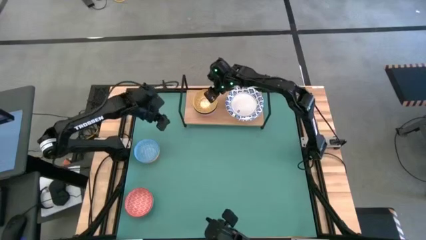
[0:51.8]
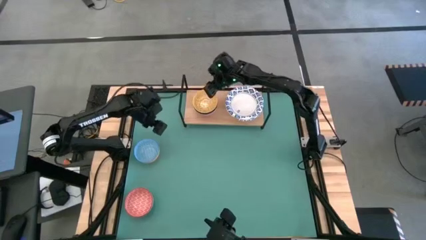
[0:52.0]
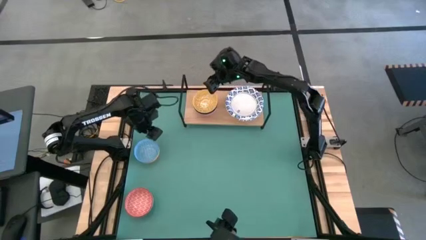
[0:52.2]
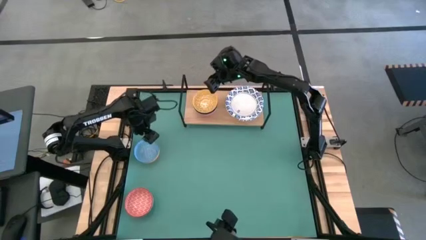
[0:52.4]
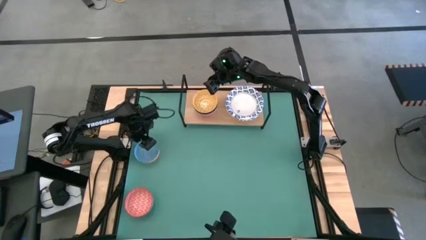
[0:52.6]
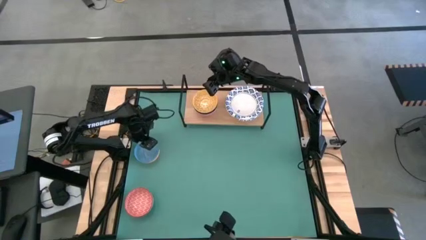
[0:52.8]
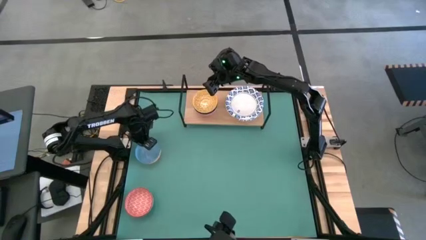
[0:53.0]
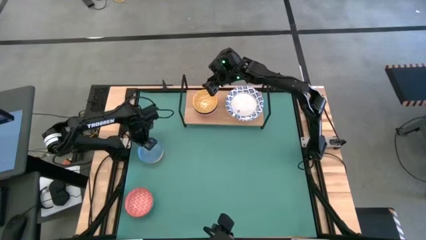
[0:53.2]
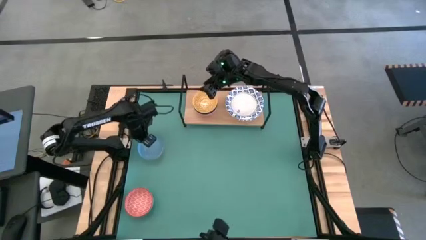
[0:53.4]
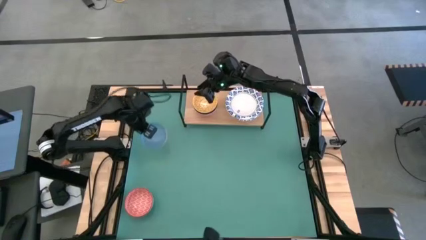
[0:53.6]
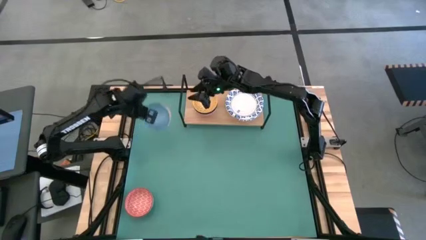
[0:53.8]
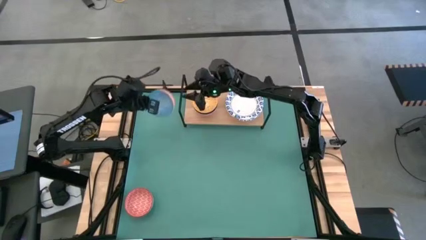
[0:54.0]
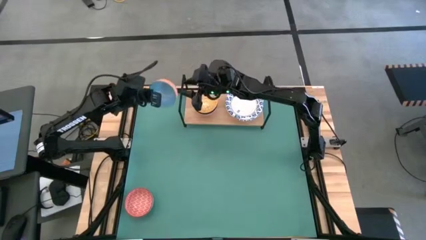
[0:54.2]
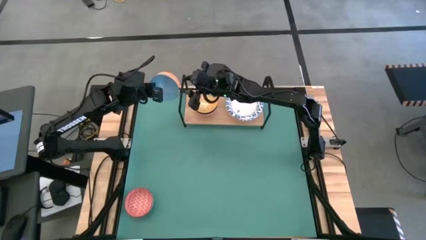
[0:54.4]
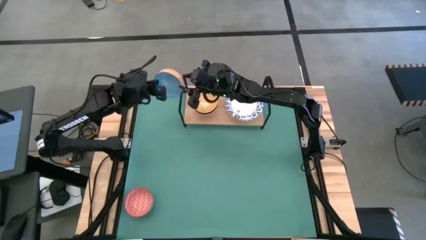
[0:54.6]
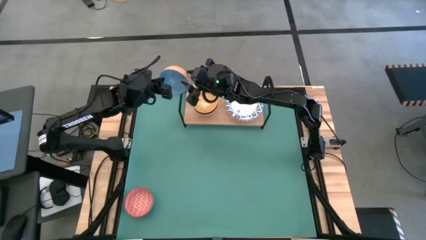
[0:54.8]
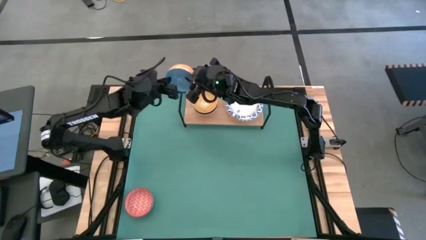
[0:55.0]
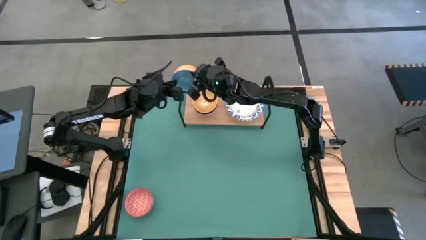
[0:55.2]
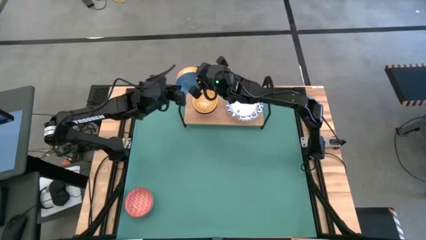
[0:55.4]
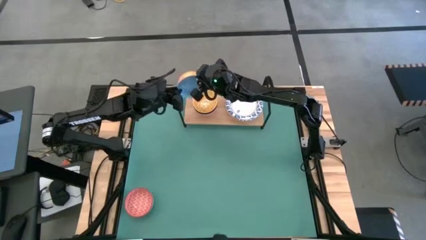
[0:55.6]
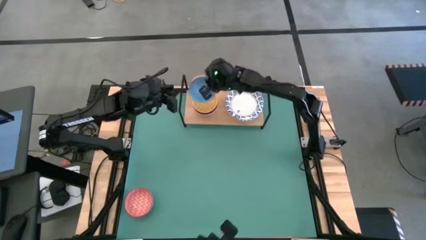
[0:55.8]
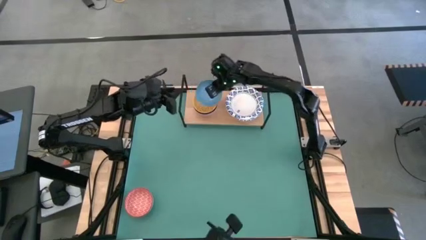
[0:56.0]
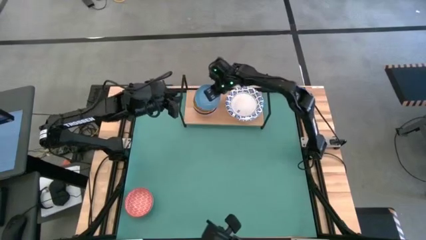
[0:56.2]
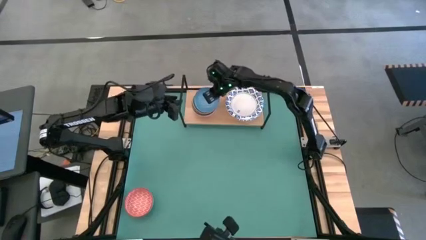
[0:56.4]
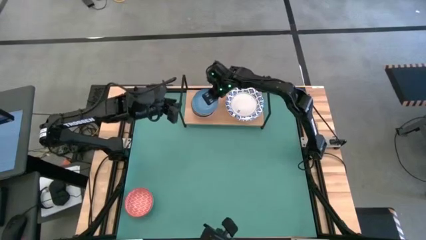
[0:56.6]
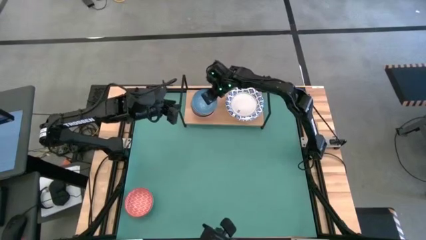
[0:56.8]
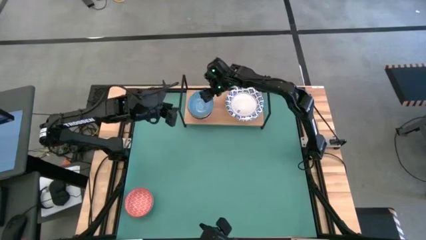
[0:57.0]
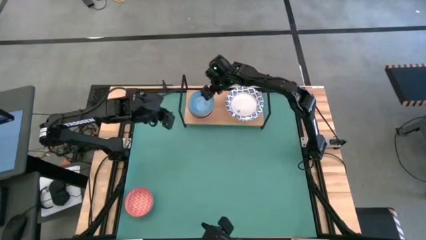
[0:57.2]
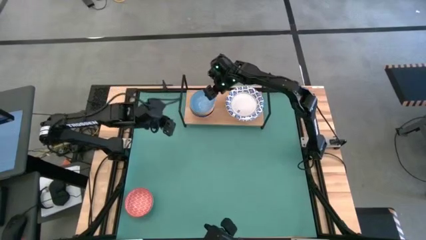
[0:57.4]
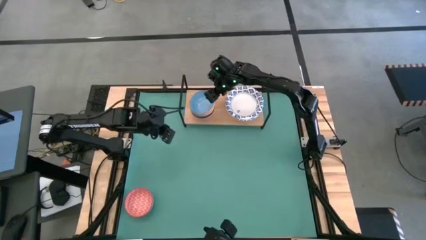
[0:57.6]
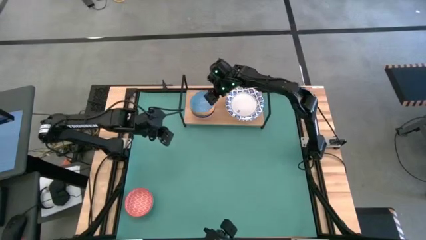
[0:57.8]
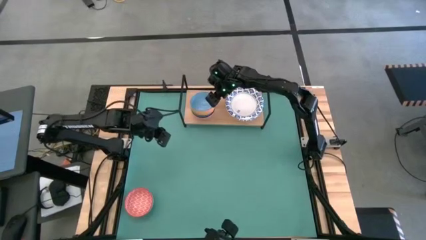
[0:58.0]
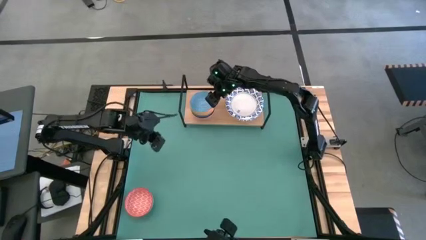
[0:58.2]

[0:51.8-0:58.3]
Task: Place and stack bowls onto a shelf
Stack the blue bowl on the yellow bowl on the shelf

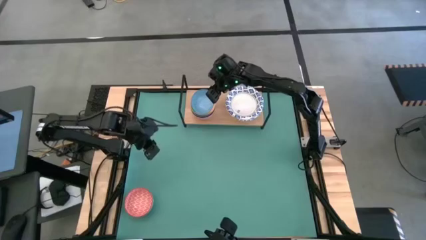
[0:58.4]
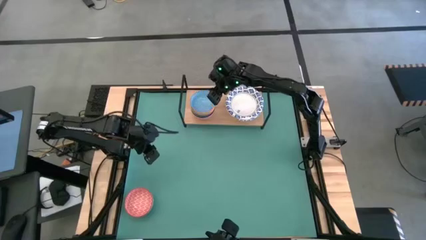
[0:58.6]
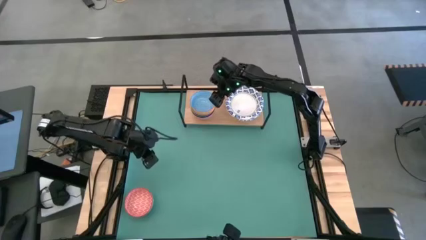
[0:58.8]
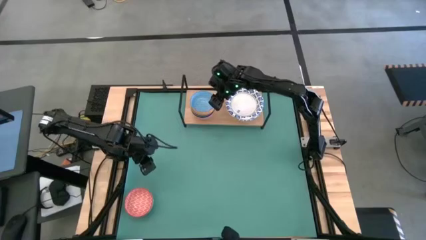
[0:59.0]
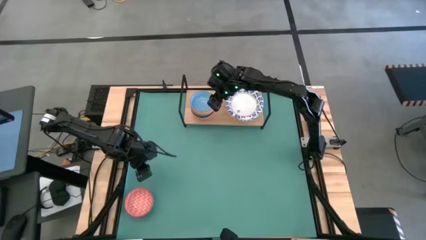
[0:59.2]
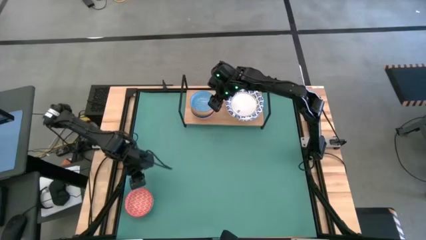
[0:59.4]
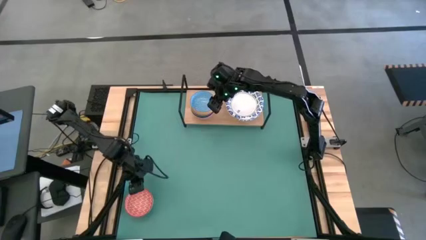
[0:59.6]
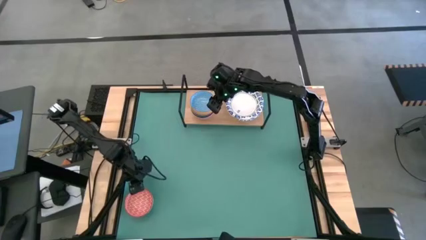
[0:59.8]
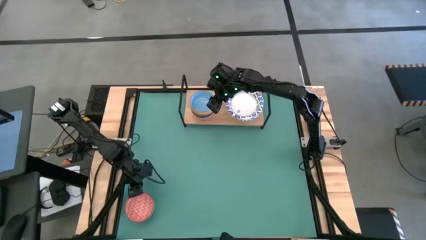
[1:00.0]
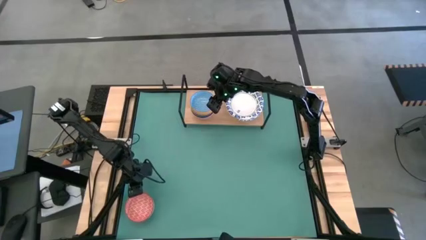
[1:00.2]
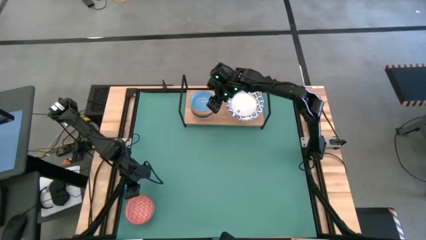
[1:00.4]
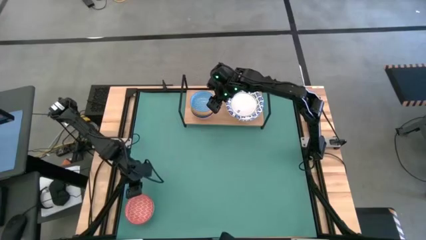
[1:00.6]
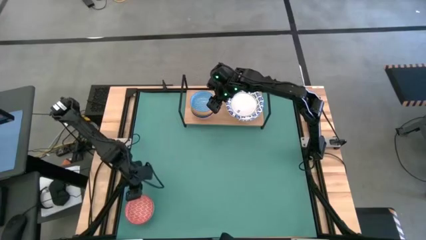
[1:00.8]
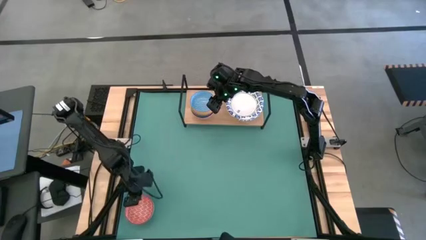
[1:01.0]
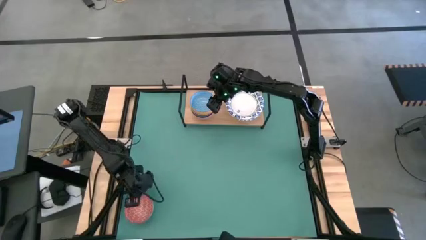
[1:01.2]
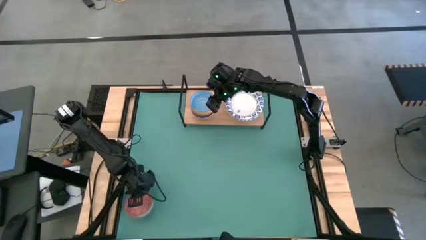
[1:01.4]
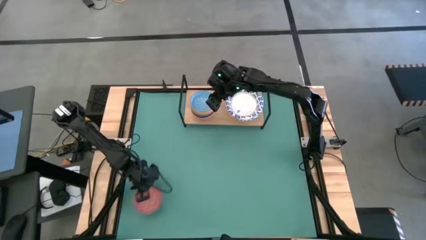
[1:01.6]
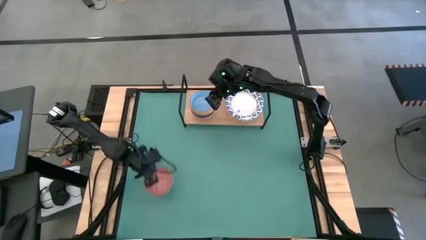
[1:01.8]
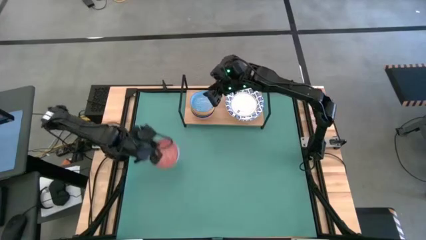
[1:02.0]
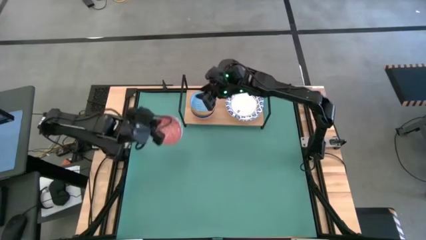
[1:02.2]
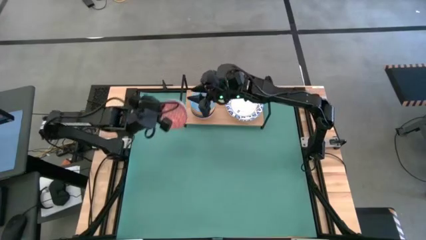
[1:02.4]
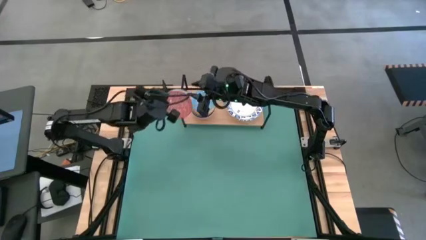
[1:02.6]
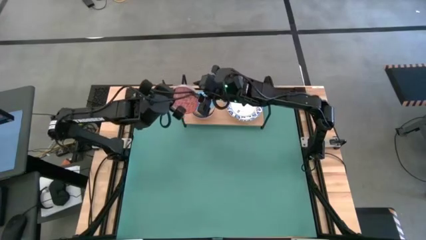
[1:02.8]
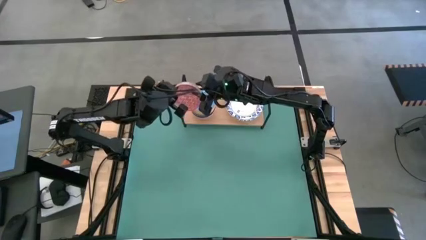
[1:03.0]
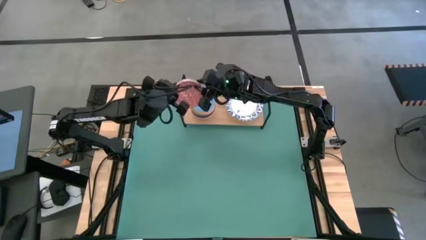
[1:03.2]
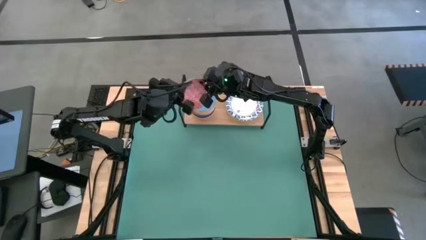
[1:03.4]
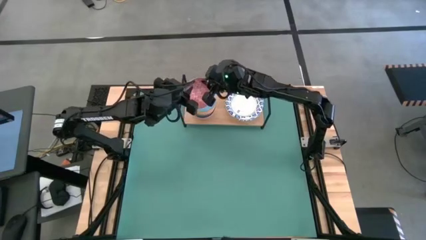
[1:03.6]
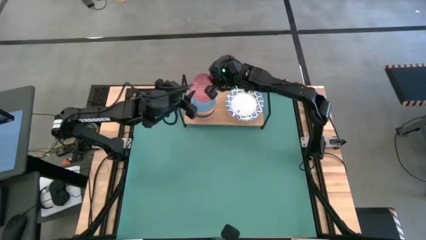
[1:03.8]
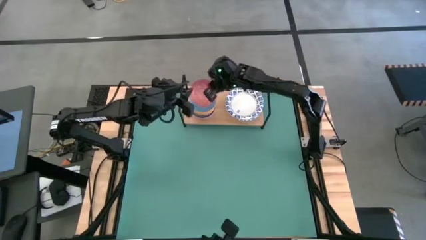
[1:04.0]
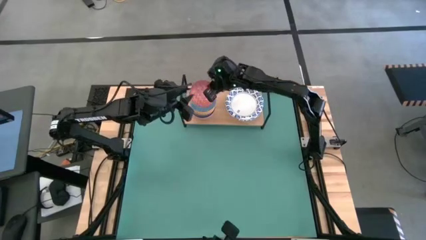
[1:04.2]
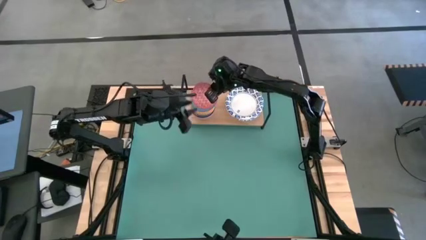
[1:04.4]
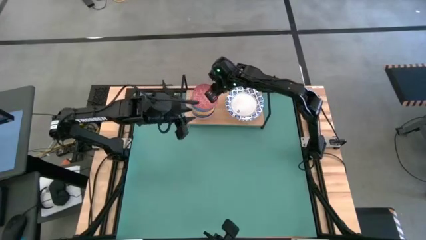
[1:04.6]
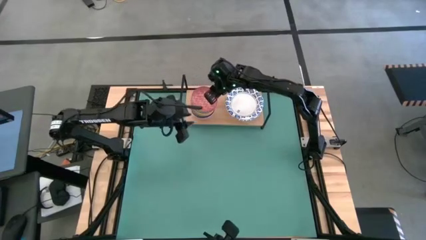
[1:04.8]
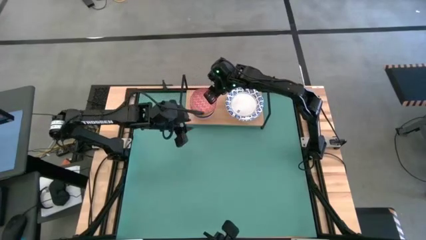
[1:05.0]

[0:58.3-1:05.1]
Stack the red bowl on the blue bowl on the shelf

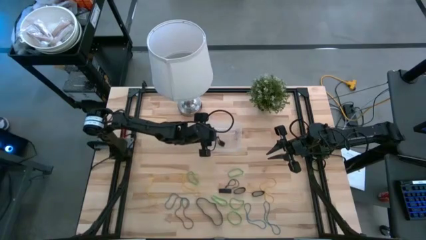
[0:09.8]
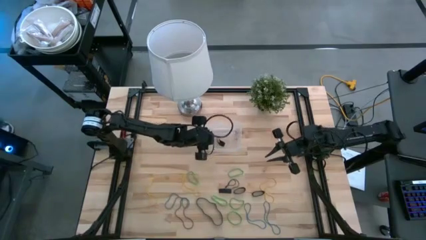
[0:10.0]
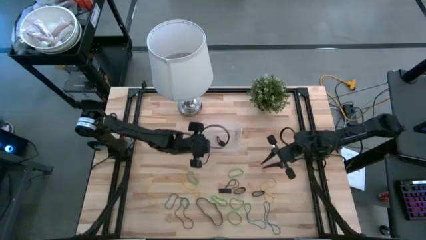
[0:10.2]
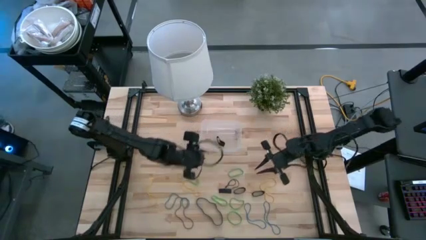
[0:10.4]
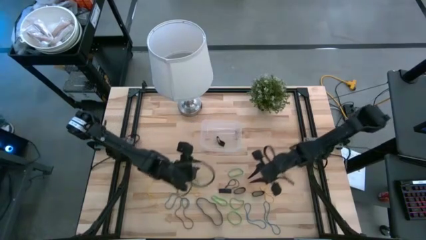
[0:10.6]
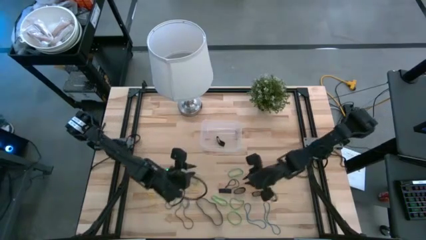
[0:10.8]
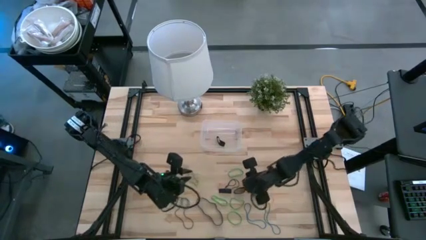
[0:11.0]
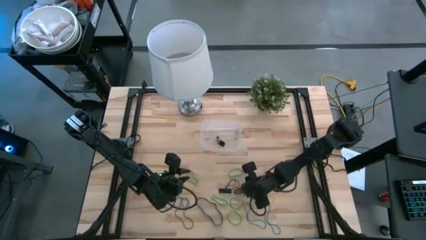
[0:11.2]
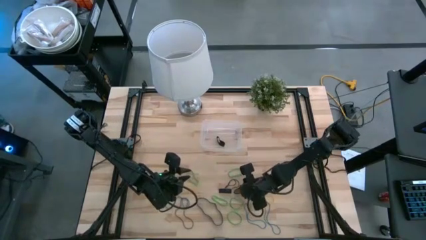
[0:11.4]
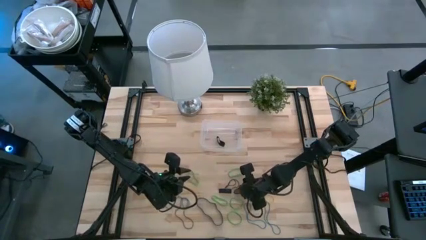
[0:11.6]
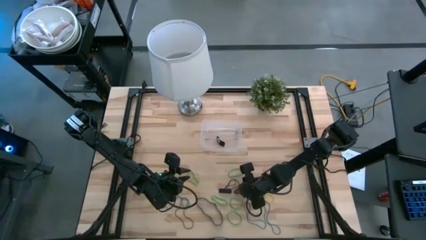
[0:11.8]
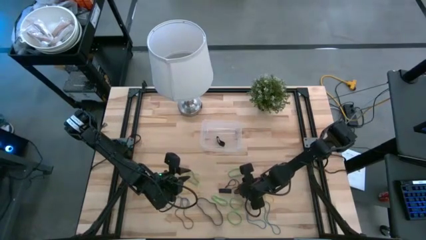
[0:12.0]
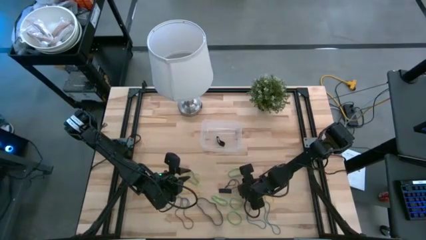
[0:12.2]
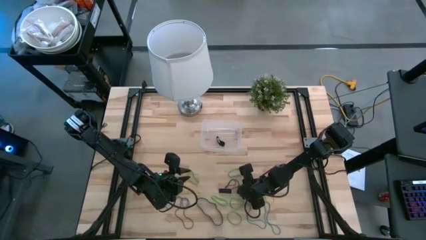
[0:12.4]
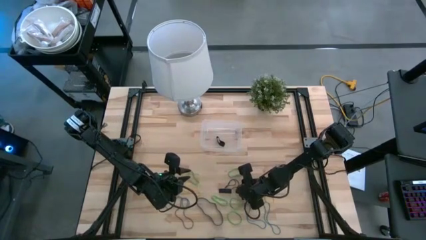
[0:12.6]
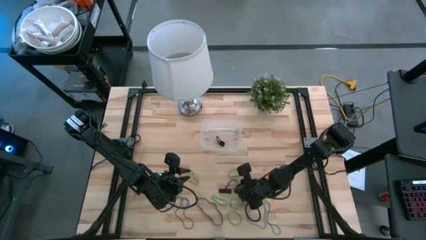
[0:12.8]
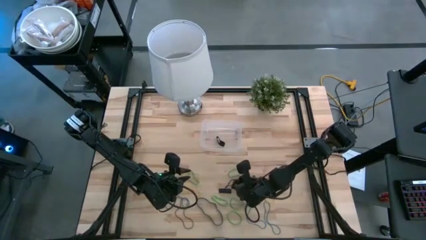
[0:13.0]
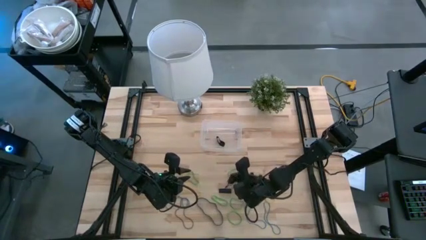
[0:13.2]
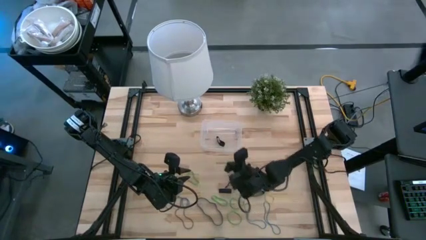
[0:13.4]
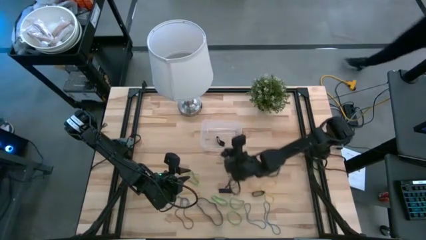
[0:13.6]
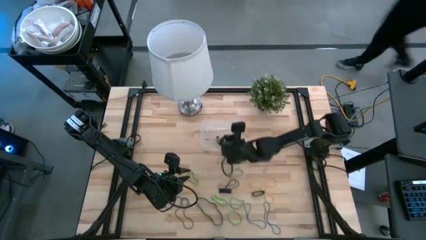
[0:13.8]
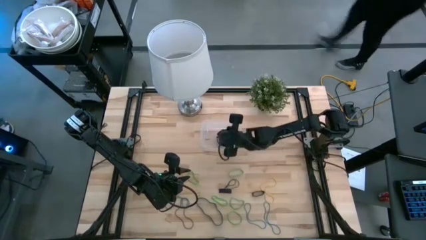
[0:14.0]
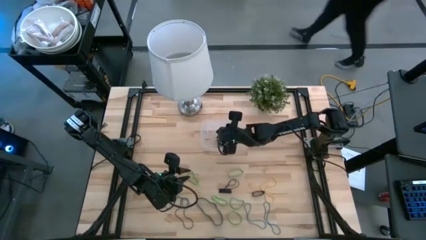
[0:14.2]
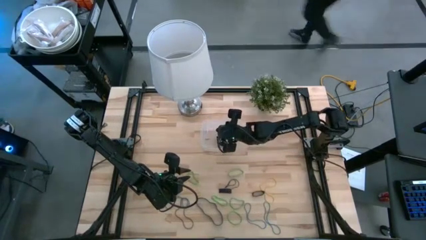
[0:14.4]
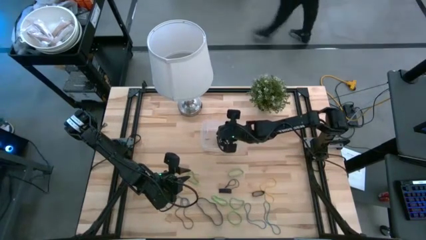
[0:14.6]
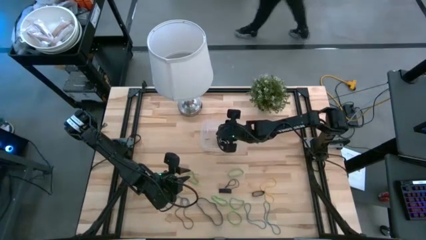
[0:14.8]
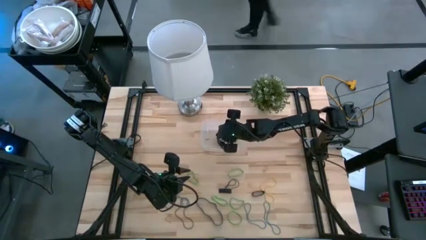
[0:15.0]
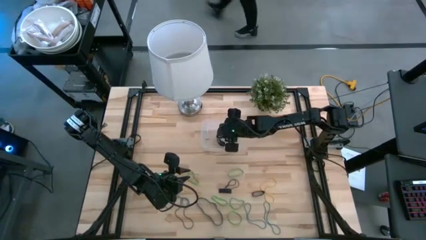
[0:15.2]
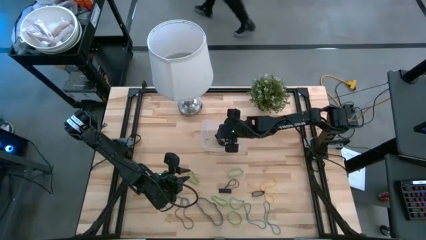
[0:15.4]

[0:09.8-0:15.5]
Task: Pick and place rubber bands into bin
Put the black rubber band into the transparent bin
